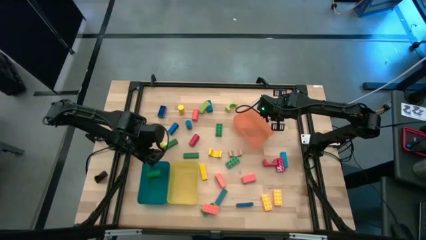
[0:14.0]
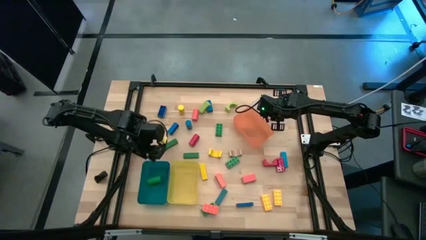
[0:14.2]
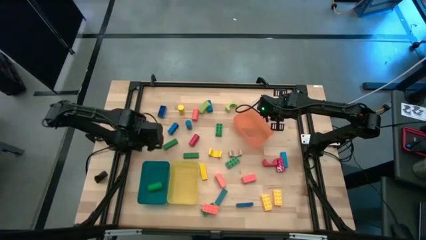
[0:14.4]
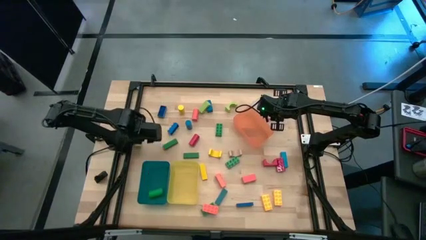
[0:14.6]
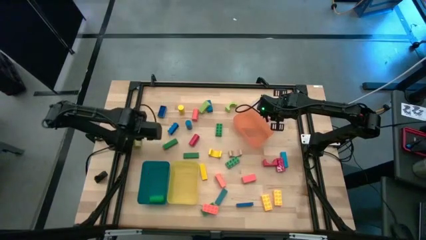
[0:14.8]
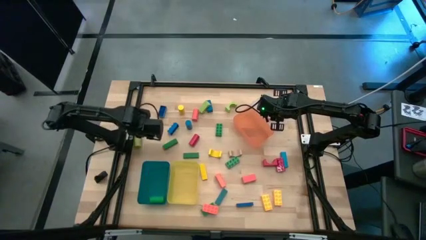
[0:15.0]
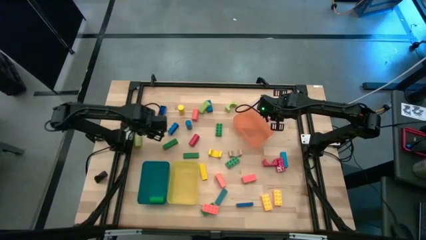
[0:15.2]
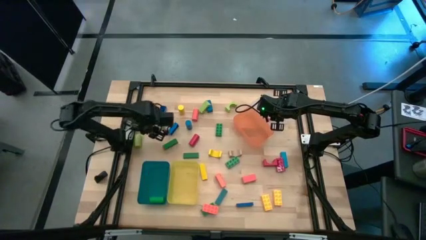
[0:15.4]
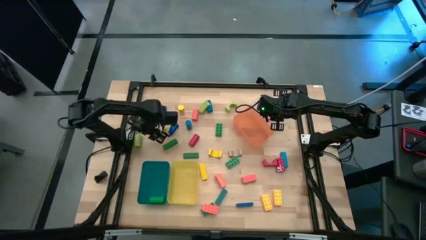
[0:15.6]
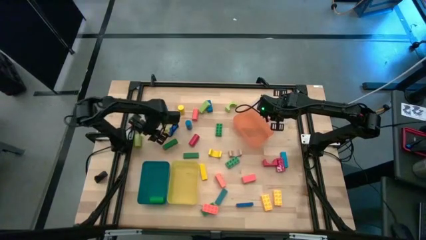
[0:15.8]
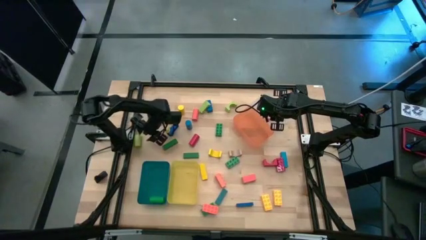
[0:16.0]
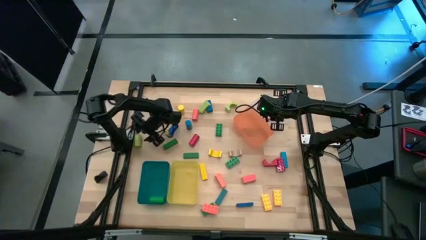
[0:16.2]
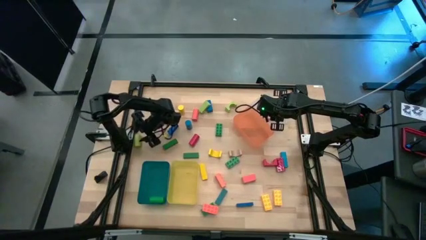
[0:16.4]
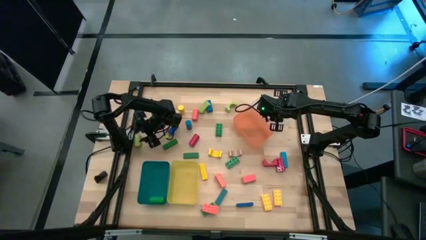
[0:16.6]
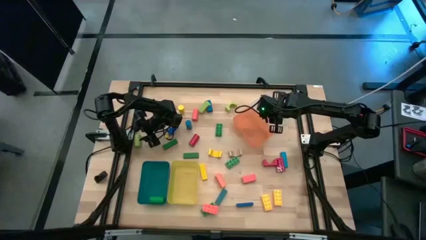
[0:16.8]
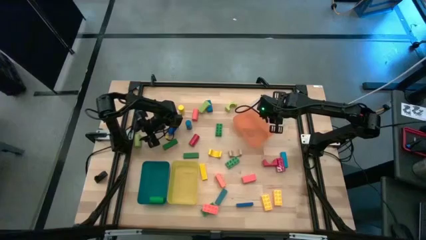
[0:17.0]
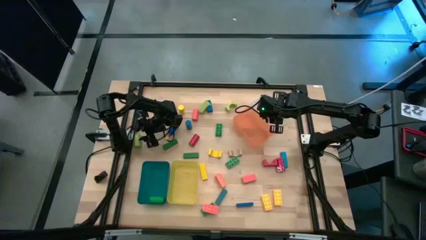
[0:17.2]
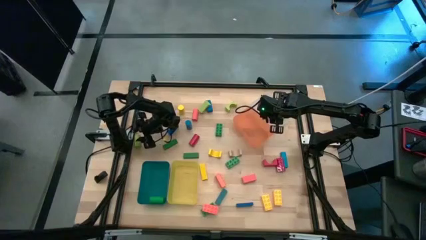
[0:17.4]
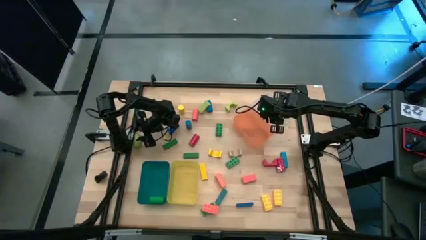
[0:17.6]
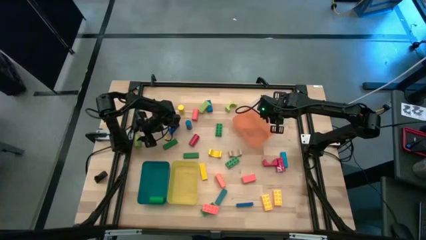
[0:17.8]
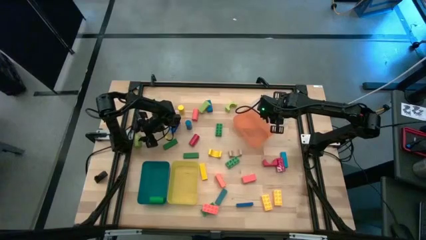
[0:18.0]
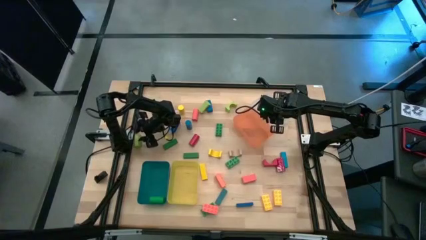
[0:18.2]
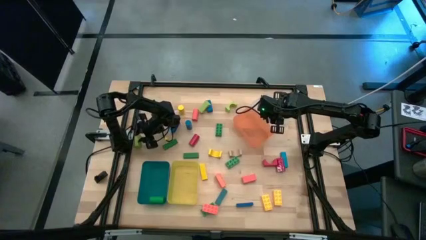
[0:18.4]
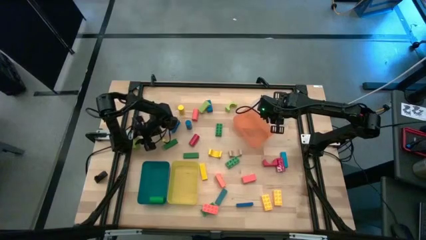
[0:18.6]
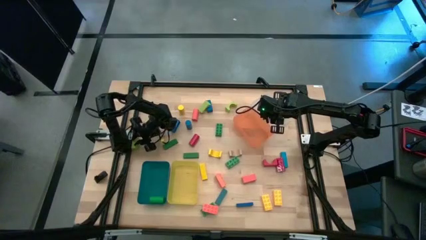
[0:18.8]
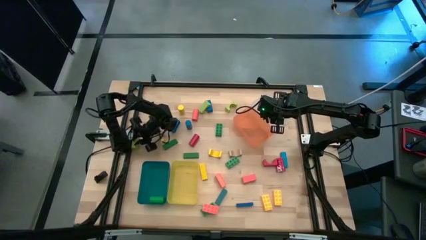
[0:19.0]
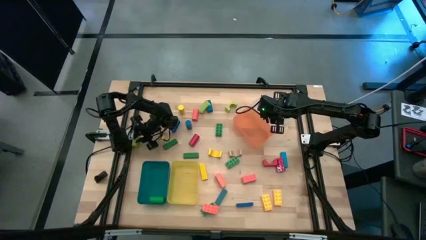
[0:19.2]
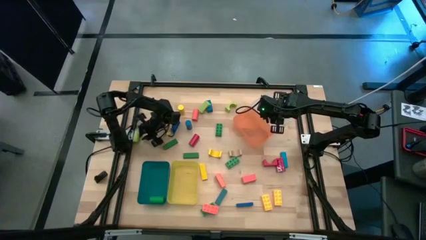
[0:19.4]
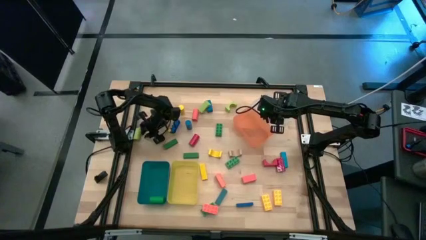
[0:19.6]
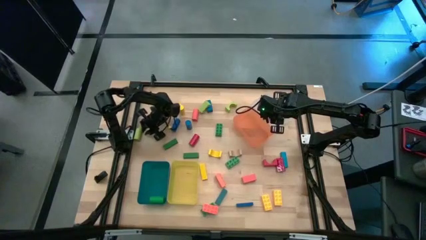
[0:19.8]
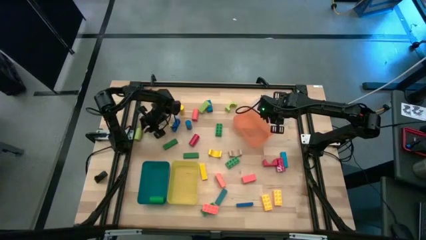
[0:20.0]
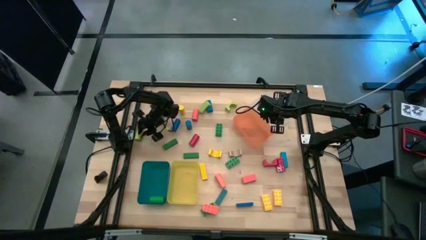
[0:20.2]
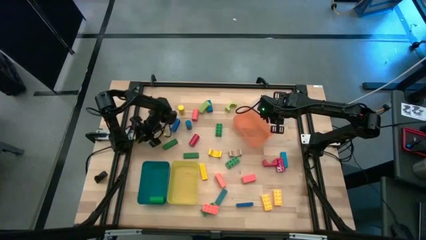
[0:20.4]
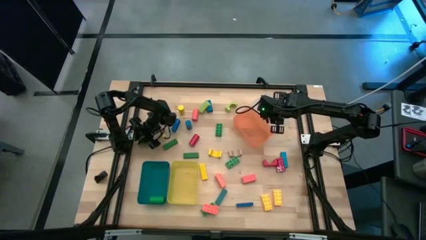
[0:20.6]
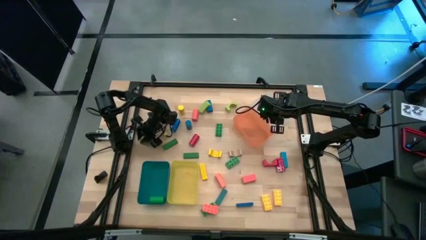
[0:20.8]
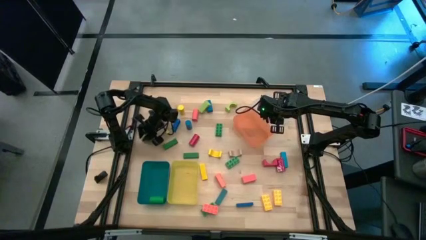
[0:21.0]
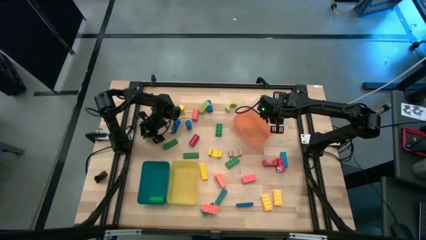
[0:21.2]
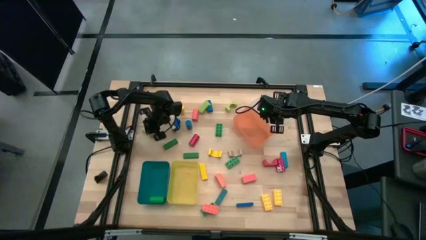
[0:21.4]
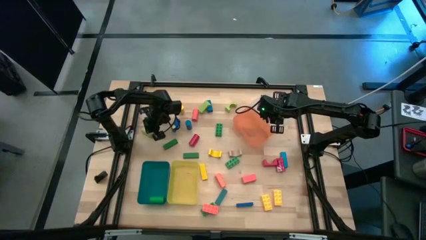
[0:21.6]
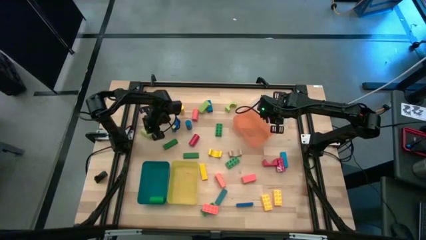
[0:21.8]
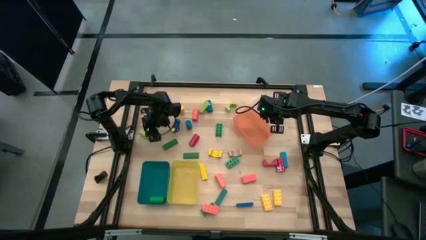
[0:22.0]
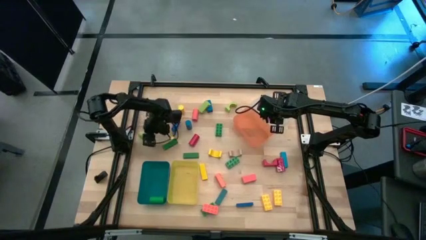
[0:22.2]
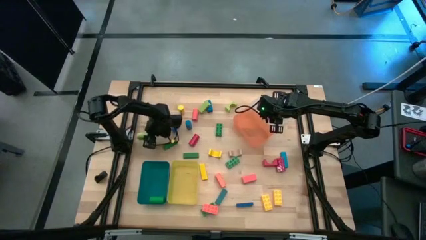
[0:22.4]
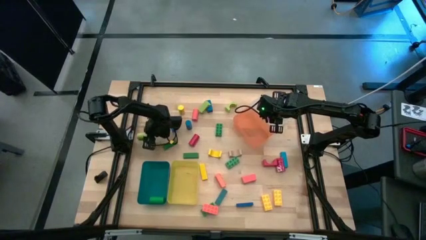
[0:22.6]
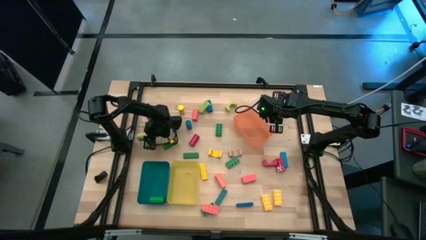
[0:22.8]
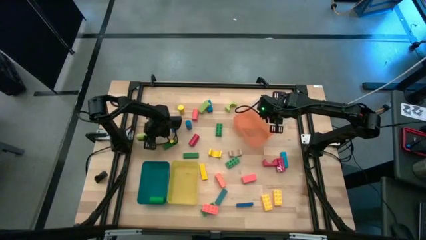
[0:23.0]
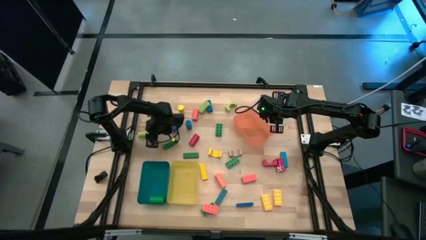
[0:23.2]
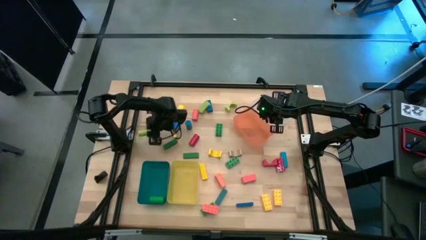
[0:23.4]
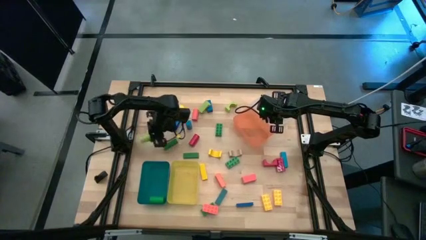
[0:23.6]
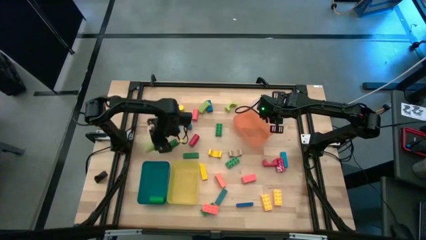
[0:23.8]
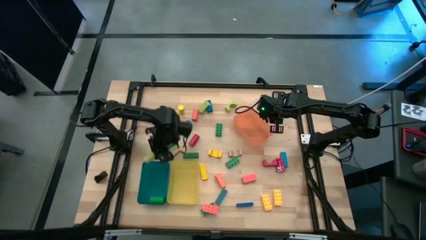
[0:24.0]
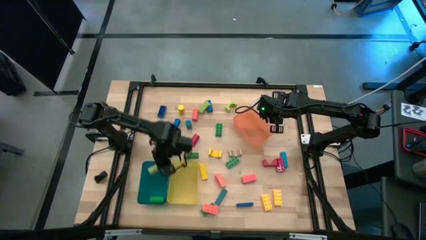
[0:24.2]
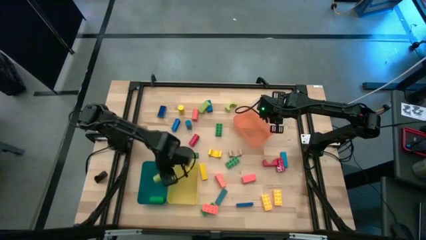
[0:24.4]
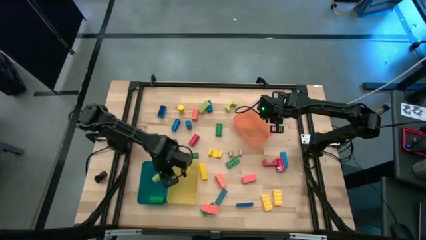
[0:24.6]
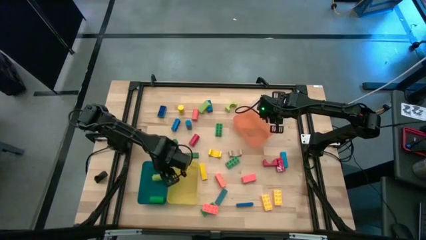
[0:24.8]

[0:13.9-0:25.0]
Task: Sort blocks by size
Put the light green cylinder block into the blue bin

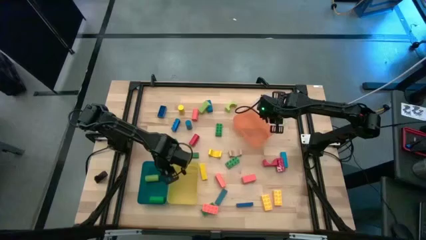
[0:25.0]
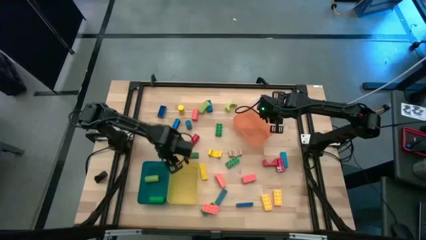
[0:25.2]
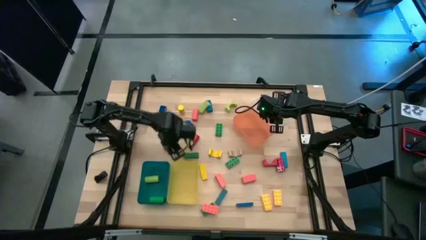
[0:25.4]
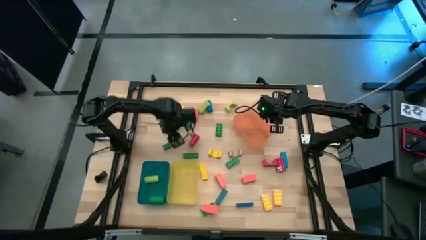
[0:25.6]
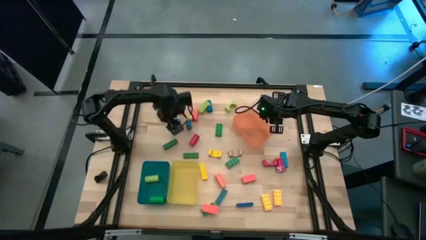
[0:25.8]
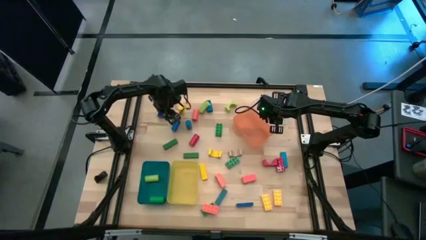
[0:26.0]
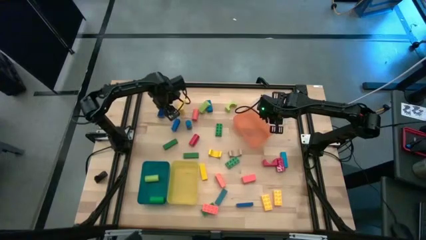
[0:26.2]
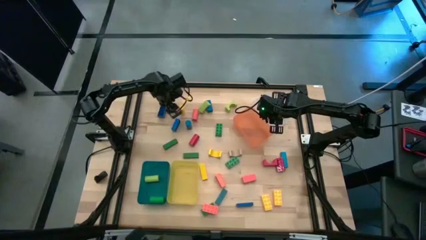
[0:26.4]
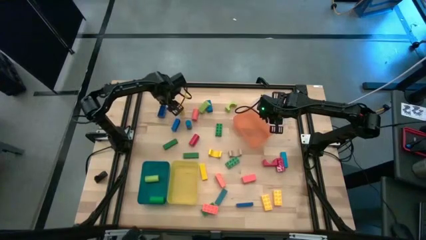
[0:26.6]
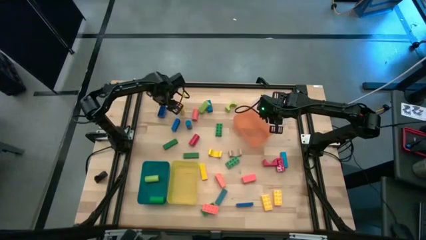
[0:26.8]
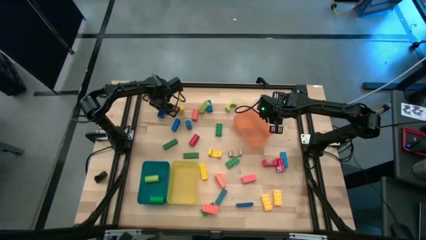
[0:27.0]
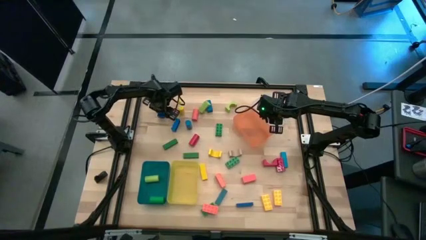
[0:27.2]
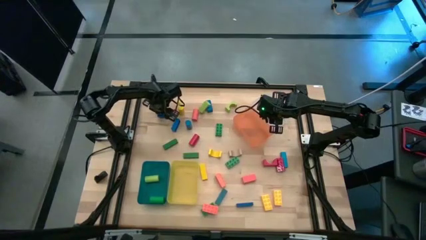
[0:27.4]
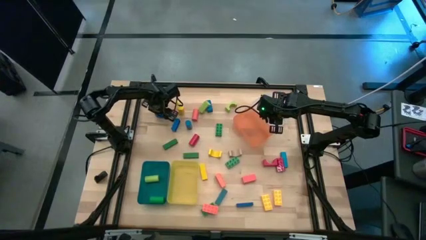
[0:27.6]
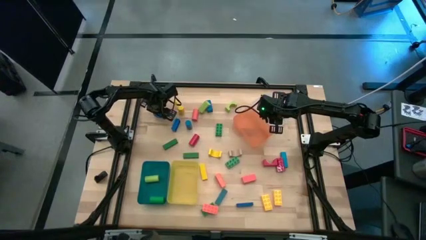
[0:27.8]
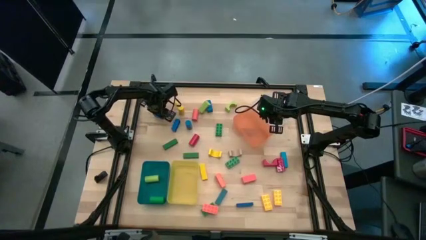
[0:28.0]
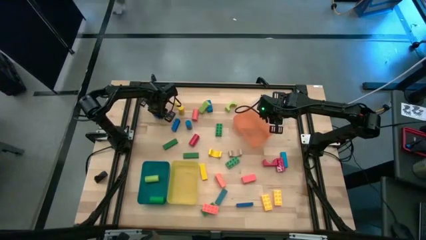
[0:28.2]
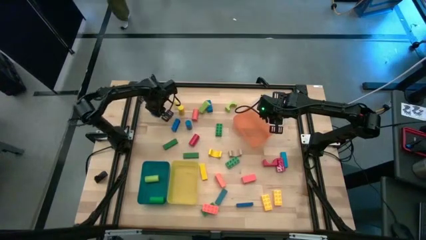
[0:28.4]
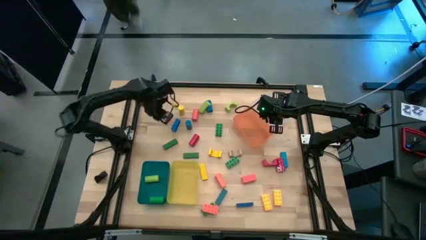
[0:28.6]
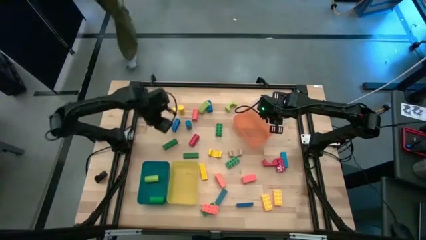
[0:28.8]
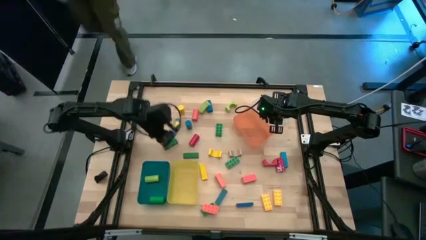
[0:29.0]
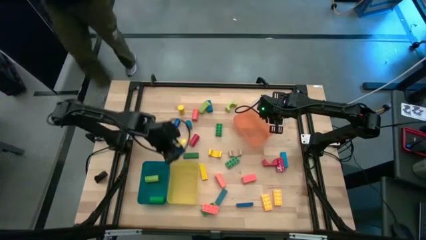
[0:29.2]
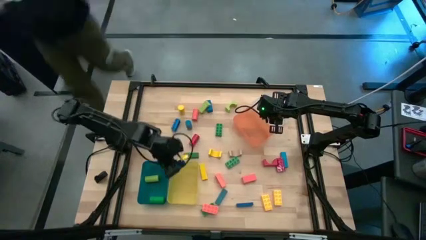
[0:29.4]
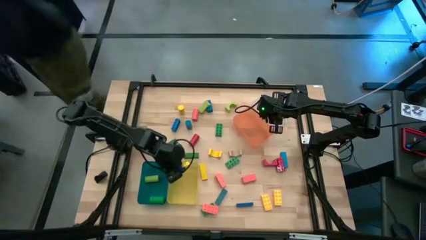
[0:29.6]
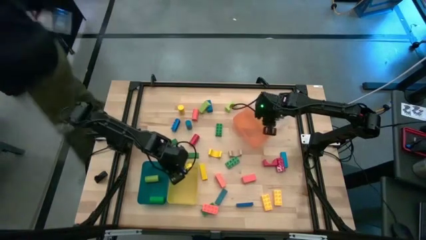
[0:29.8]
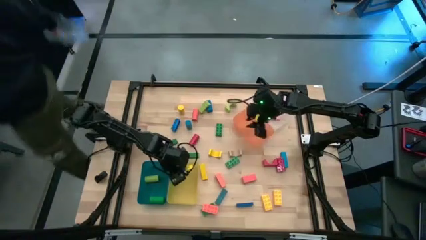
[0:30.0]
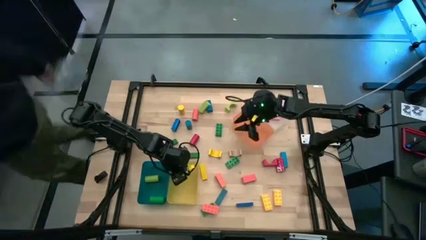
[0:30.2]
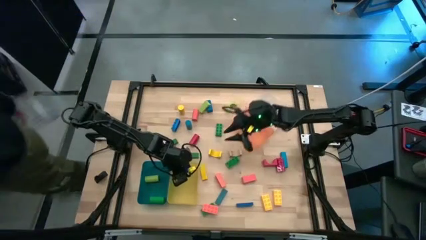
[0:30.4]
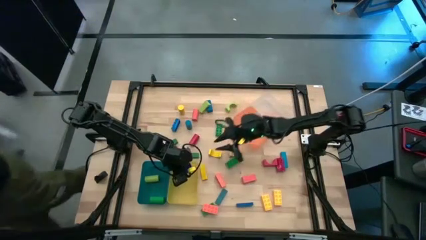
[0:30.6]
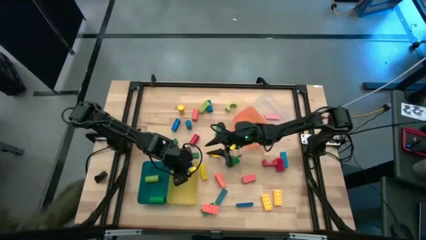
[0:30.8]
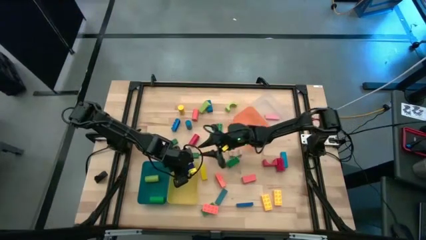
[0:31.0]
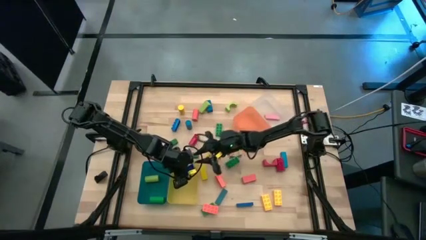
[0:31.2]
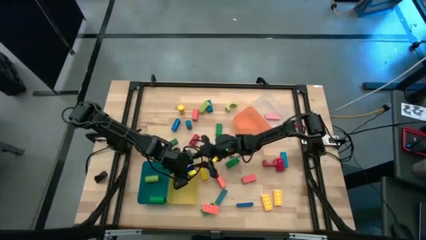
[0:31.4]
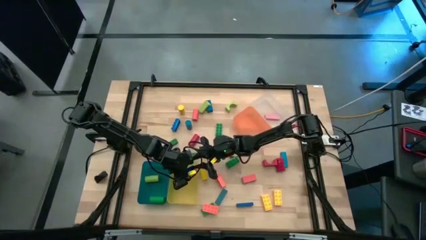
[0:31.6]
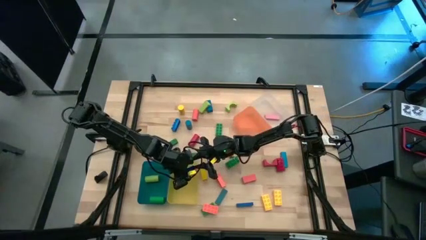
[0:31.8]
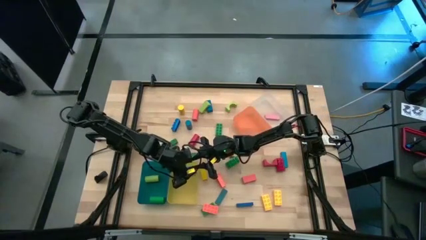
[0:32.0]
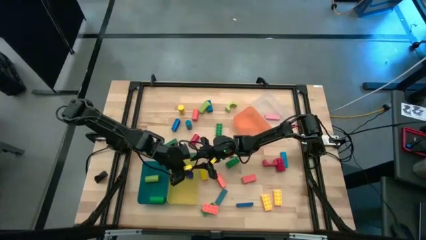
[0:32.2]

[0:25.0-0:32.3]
Put the blue rectangle game piece into the yellow bin
